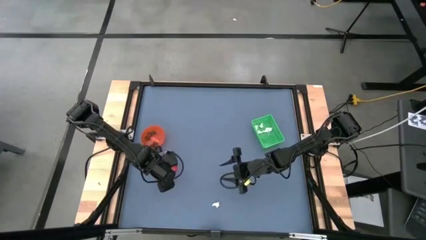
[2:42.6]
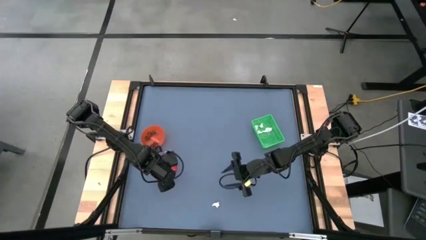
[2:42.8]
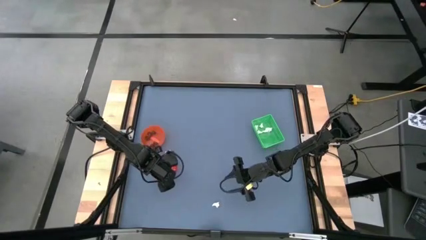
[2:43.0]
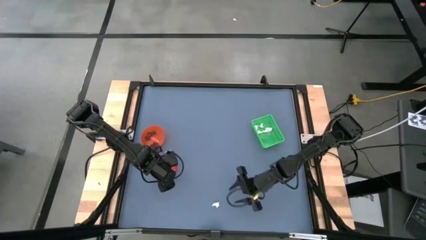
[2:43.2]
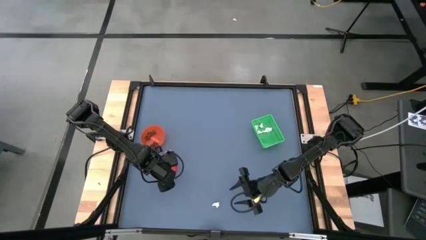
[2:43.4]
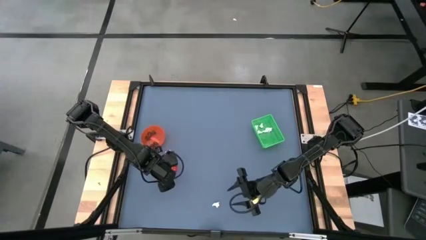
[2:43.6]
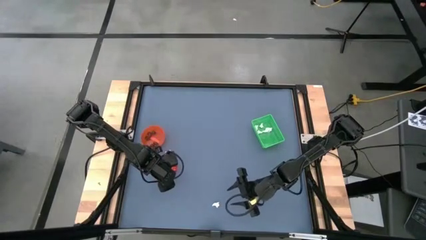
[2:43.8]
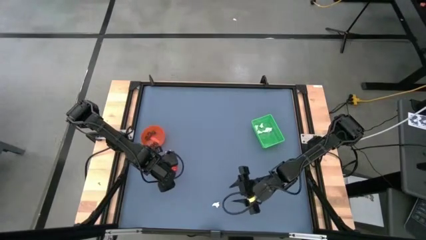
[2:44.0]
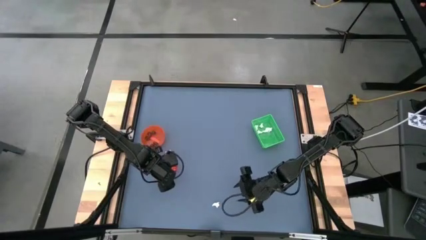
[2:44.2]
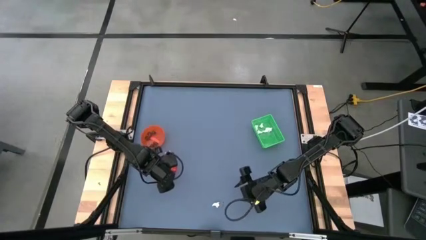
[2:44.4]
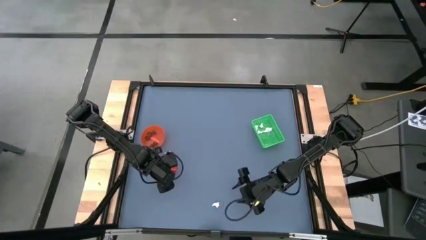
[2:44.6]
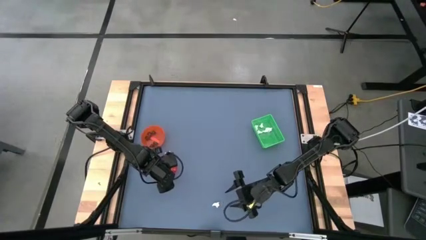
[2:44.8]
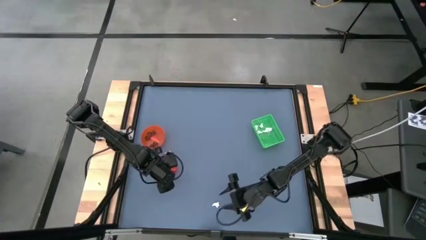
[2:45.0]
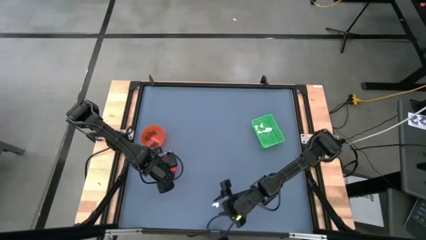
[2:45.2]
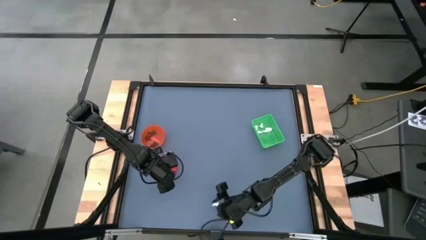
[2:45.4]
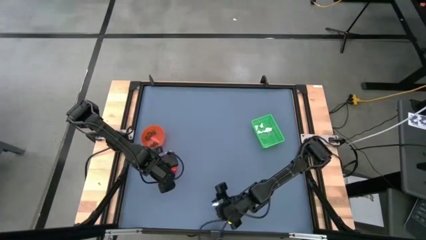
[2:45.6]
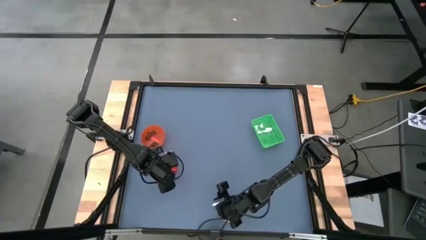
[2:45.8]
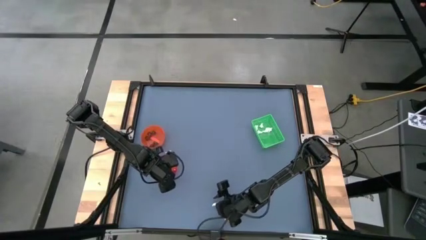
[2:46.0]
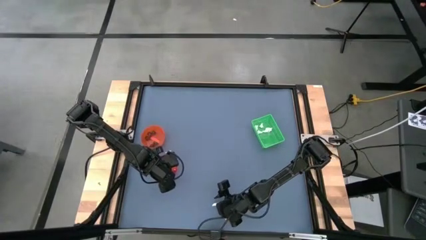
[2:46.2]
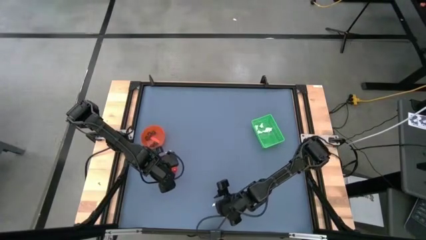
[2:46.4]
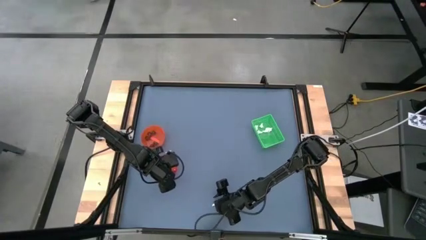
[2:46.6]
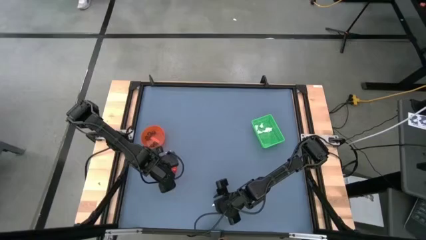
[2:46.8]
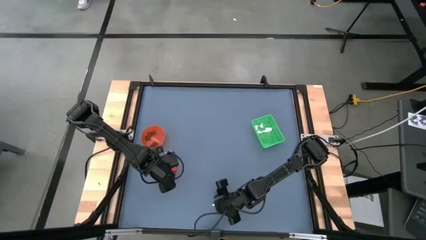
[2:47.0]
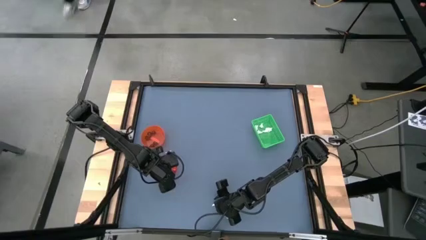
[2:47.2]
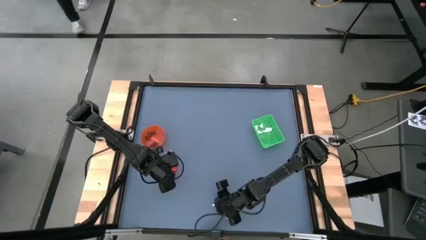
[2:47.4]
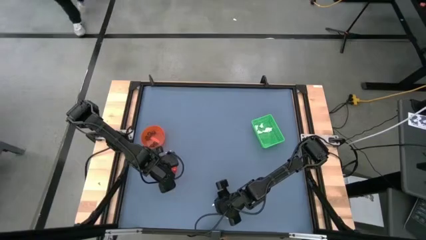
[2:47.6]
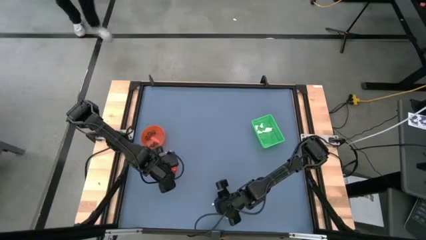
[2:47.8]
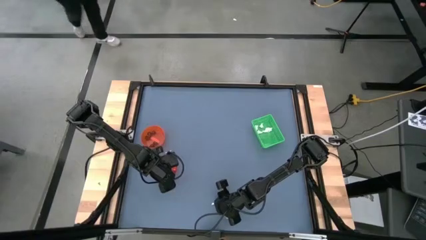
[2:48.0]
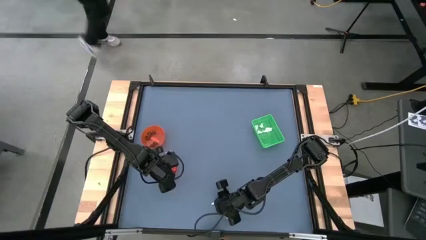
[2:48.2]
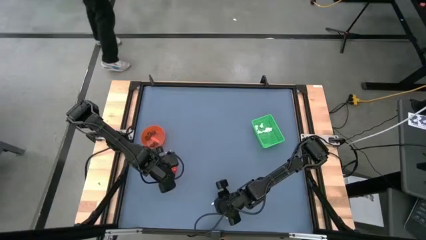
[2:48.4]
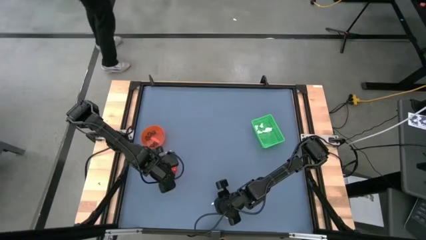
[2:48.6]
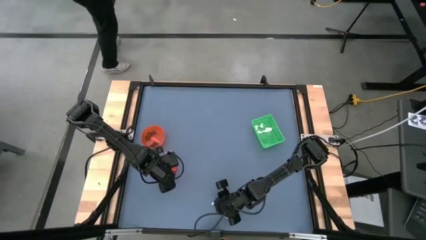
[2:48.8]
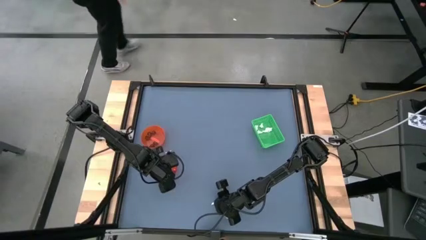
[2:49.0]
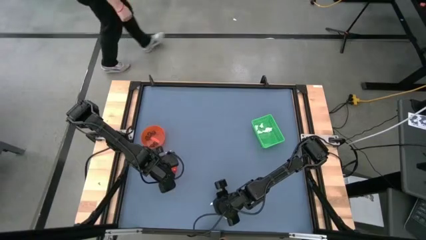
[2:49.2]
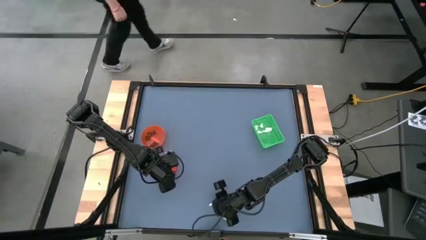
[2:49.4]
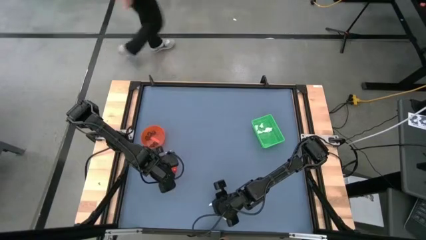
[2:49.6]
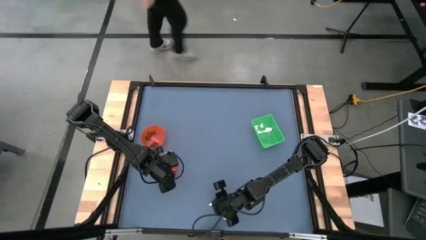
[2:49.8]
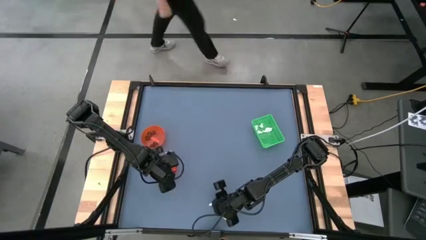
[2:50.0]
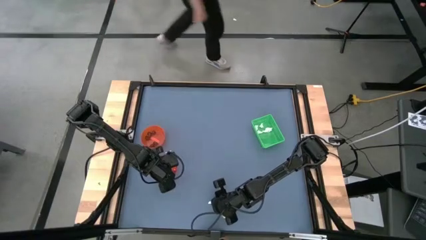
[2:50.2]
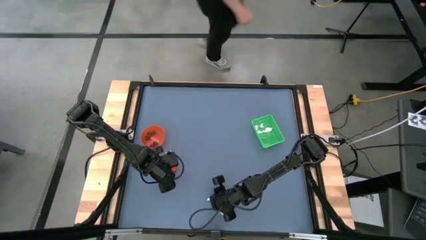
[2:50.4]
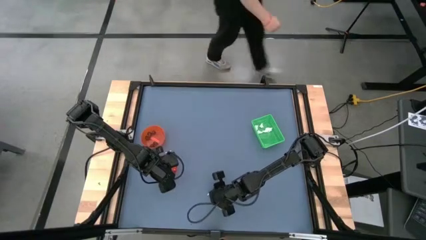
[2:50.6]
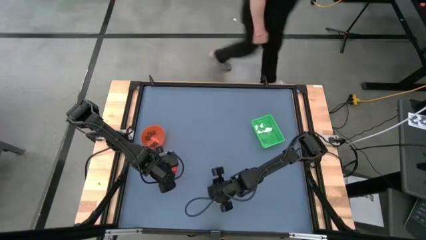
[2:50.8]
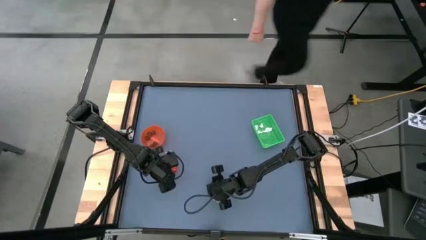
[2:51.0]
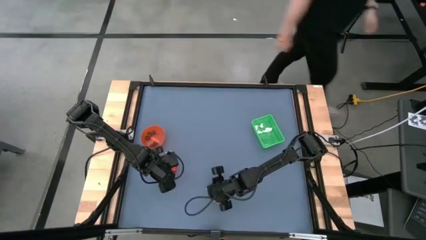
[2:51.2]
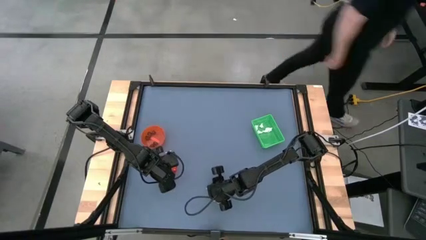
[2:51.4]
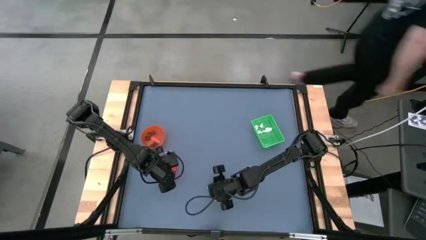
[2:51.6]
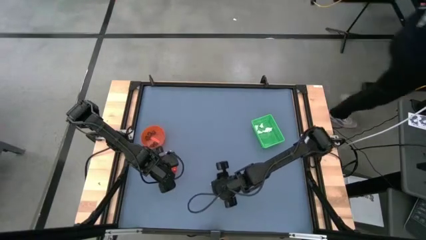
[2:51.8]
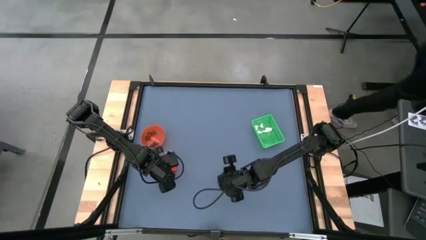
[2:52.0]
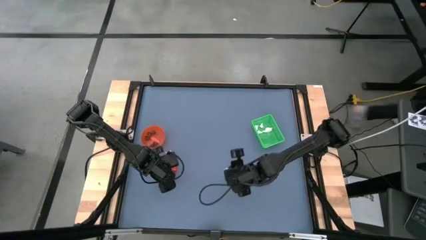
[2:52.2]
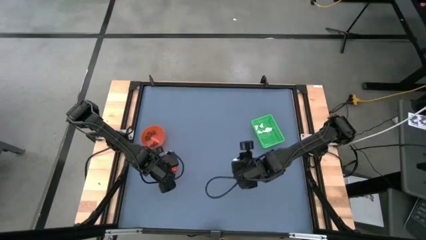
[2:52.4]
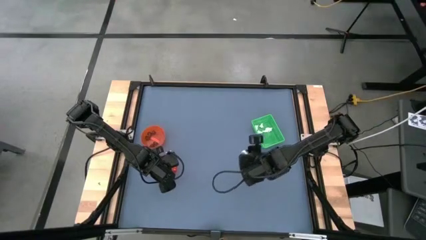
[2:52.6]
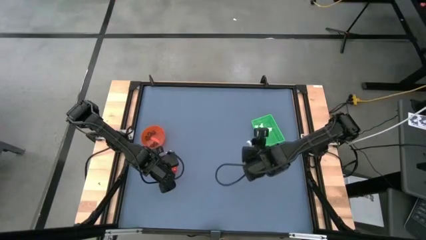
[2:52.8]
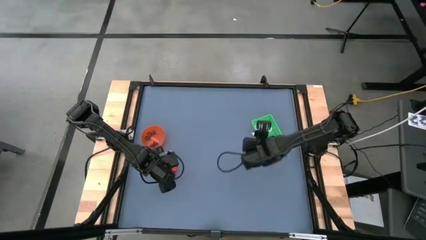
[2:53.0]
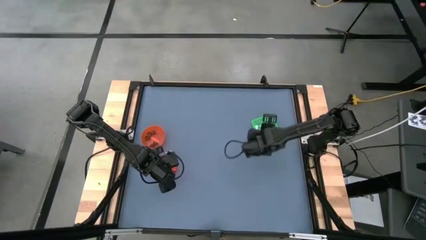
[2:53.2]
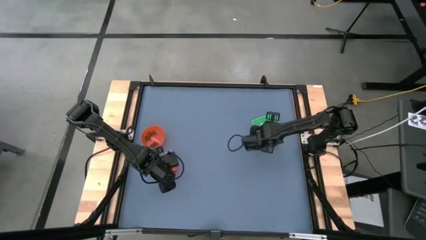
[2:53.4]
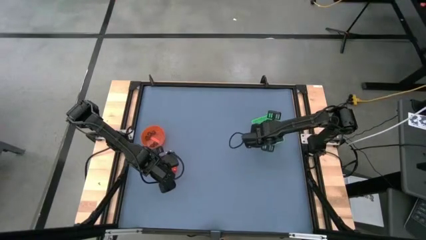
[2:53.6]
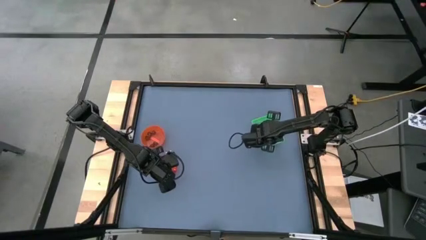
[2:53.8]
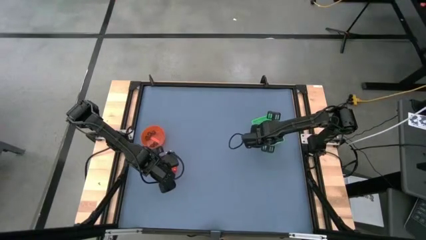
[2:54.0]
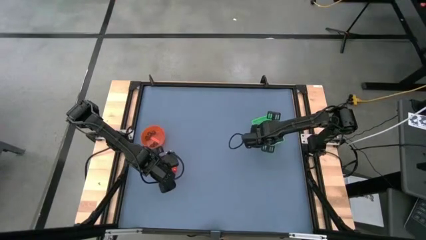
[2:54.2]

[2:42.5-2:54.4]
Task: Sort Halloween decoration
Put the white ghost toy into the green bin

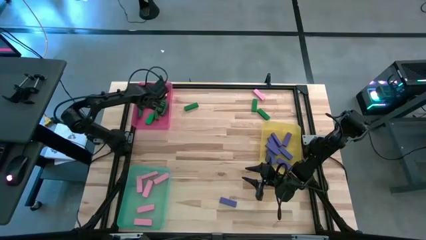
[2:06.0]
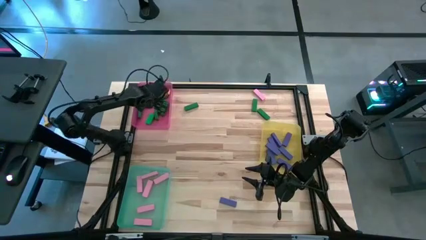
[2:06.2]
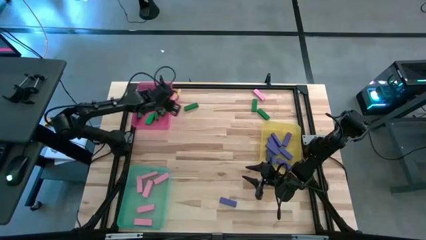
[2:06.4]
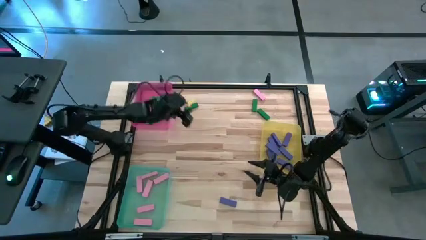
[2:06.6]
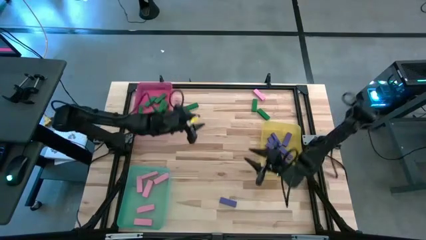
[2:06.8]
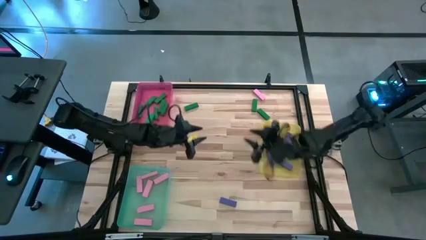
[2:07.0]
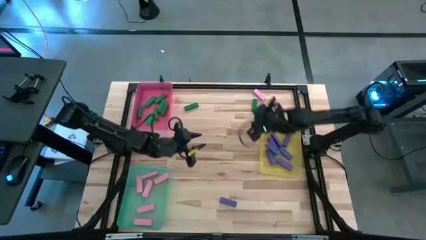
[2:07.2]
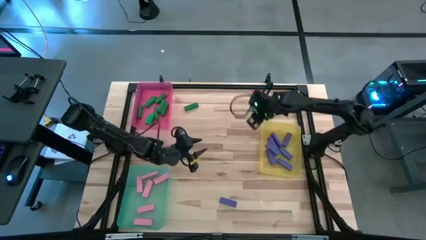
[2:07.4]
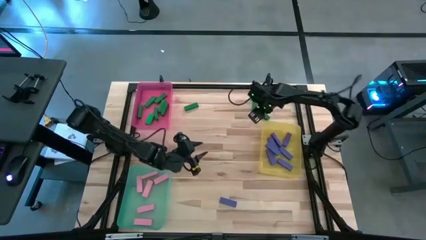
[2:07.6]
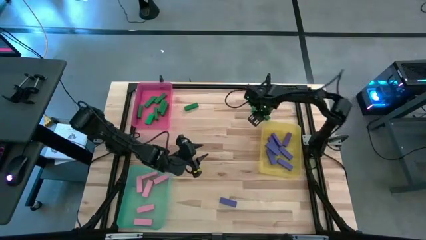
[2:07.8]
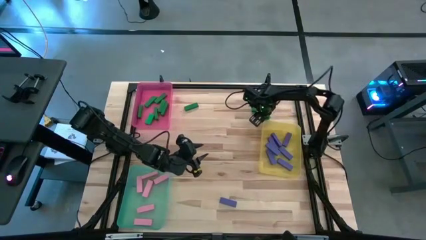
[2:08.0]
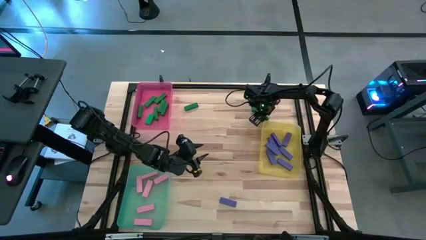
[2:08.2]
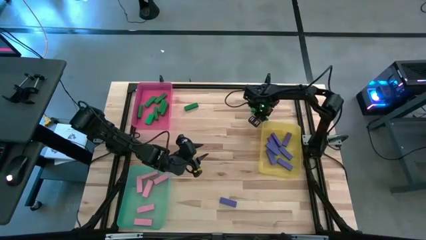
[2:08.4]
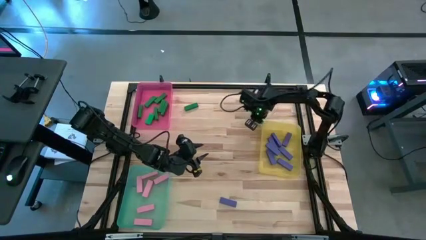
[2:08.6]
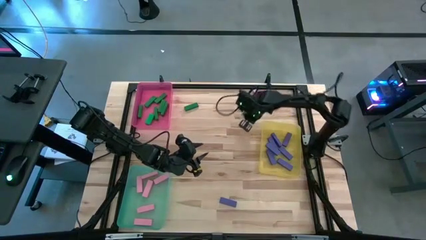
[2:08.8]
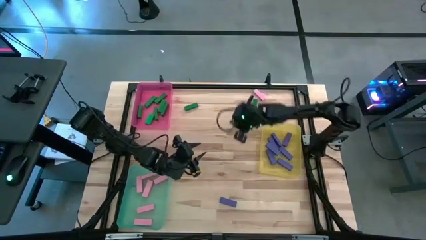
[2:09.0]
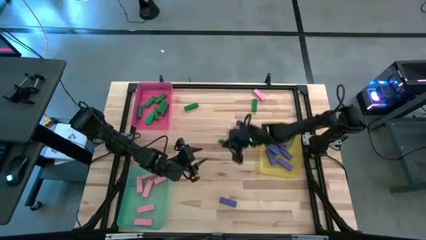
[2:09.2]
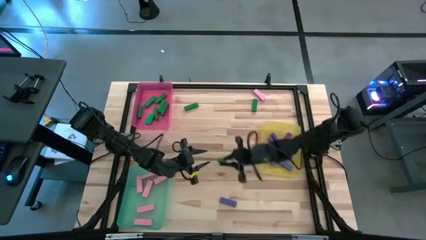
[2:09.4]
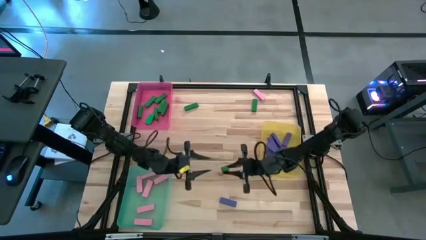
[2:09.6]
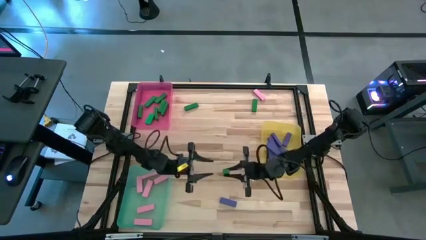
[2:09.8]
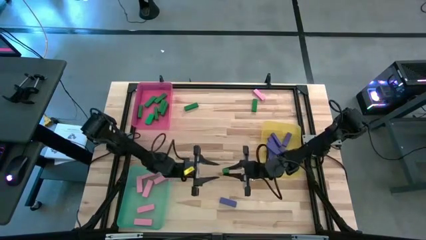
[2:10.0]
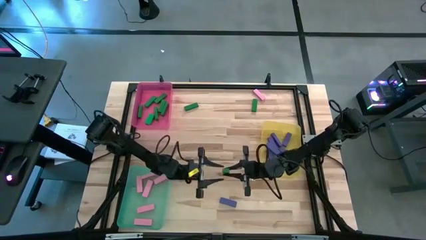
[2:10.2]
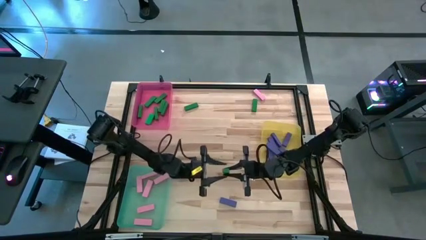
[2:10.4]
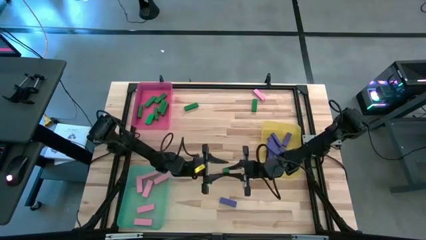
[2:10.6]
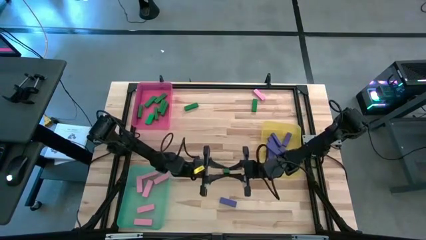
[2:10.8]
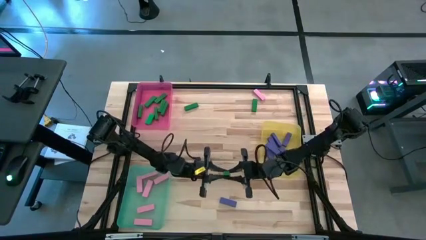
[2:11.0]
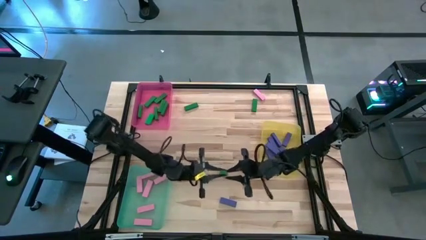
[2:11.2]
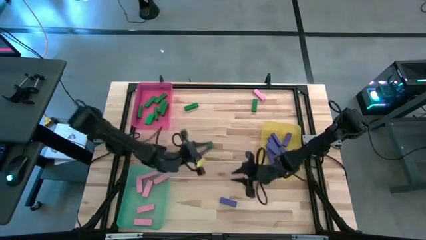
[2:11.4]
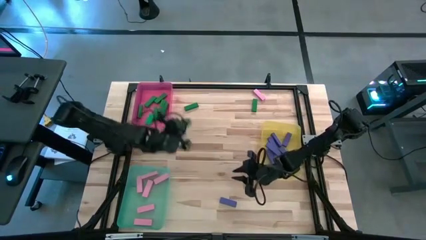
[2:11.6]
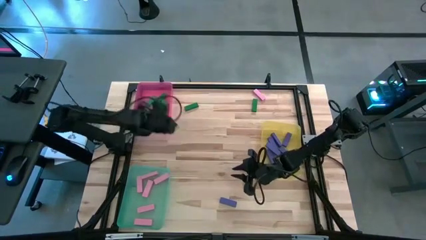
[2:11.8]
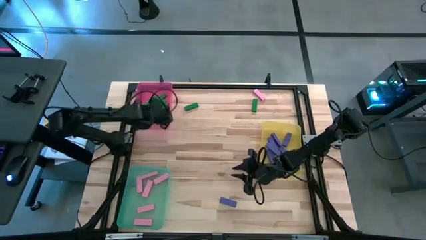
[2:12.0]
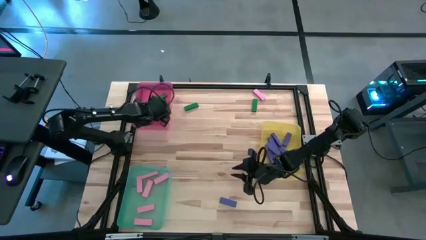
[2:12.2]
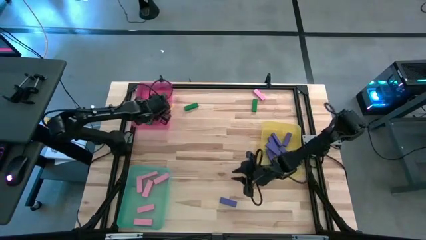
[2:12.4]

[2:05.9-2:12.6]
Task: Sort blocks
Put the green block into the pink bin
